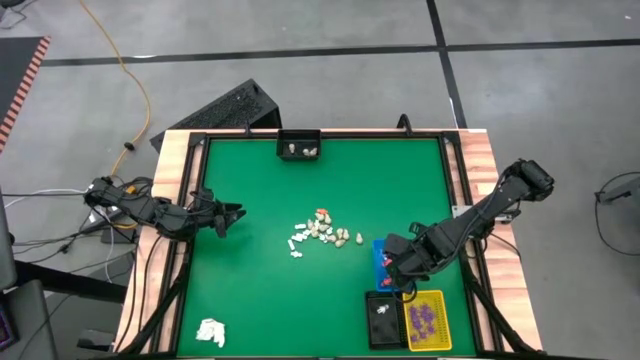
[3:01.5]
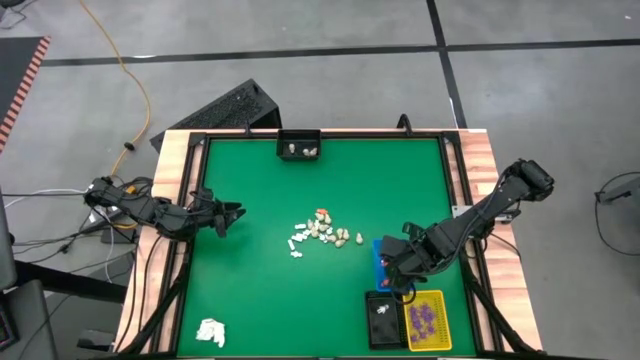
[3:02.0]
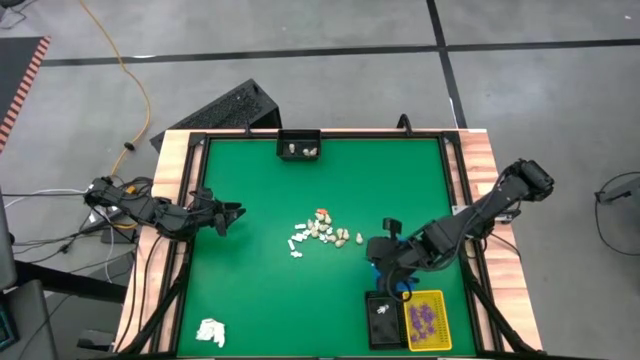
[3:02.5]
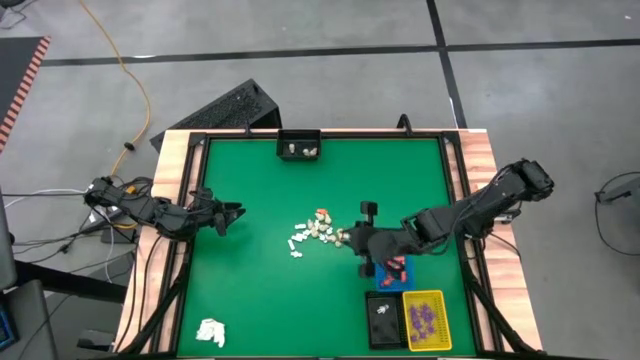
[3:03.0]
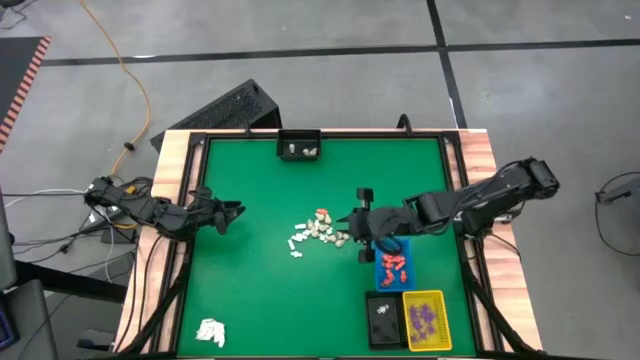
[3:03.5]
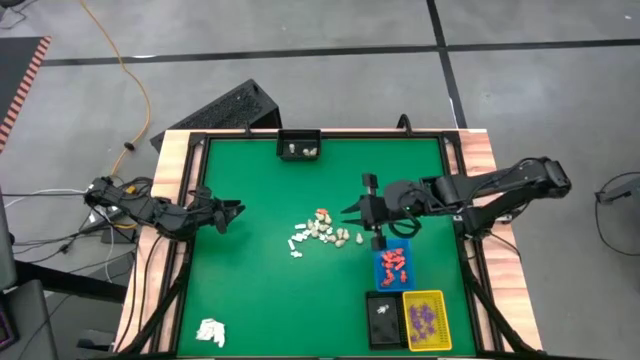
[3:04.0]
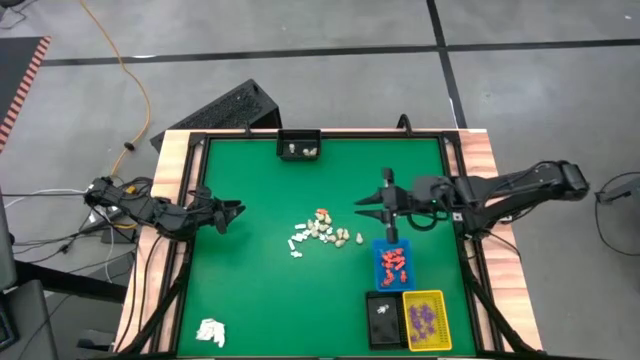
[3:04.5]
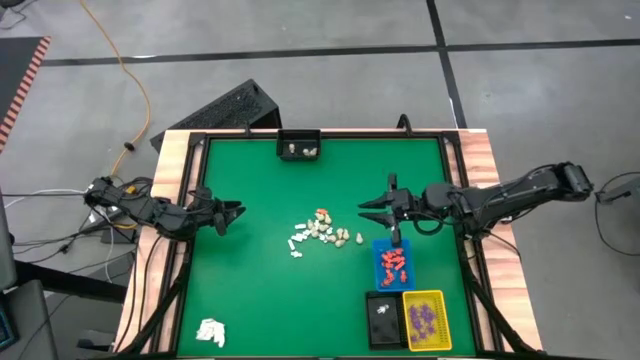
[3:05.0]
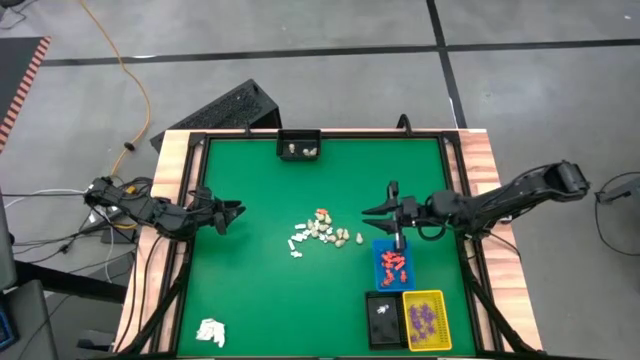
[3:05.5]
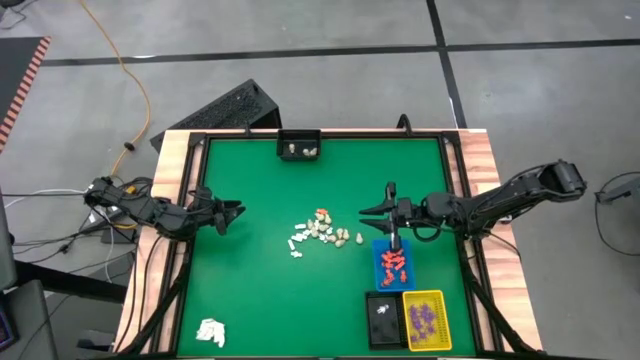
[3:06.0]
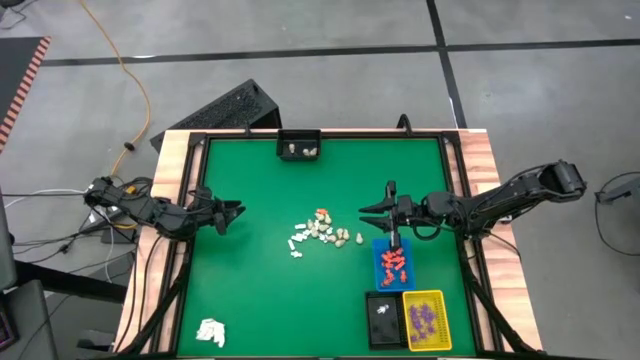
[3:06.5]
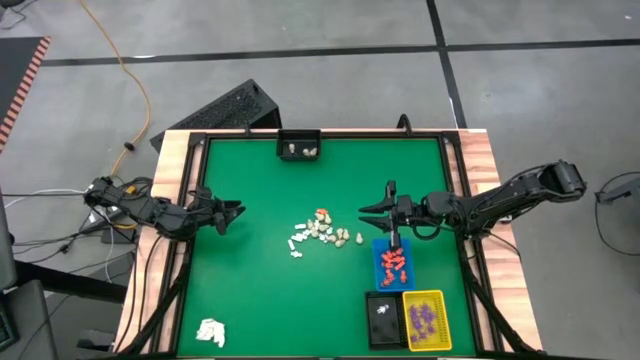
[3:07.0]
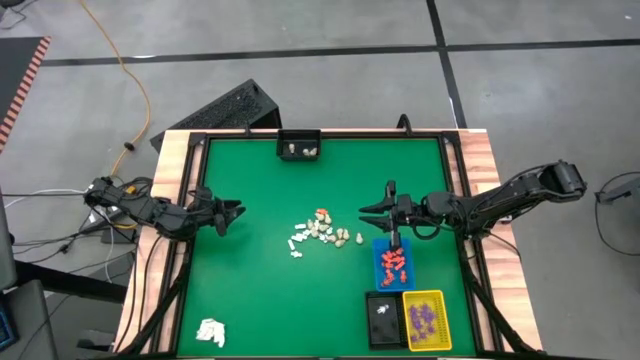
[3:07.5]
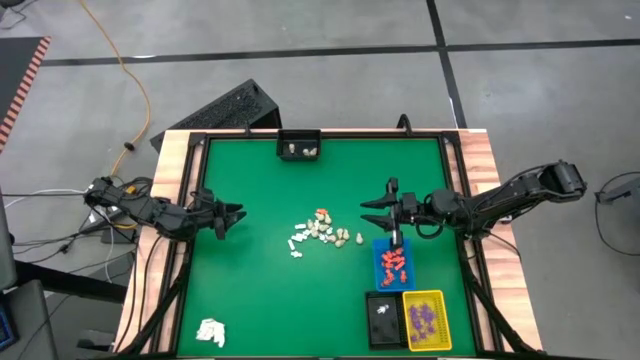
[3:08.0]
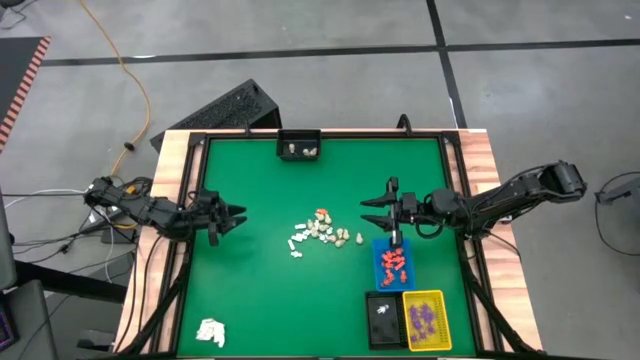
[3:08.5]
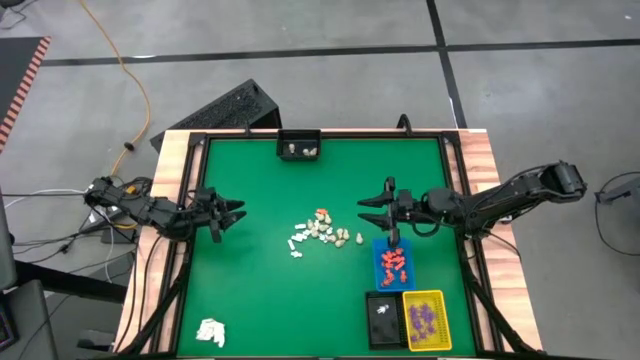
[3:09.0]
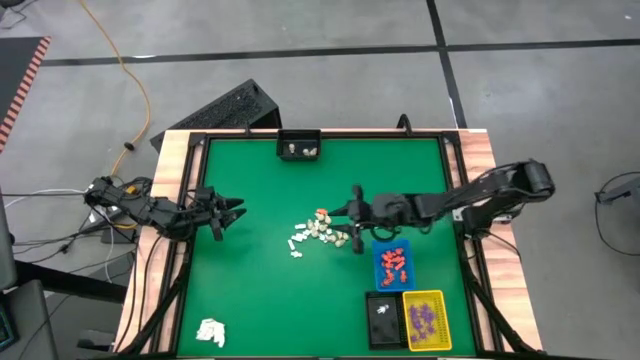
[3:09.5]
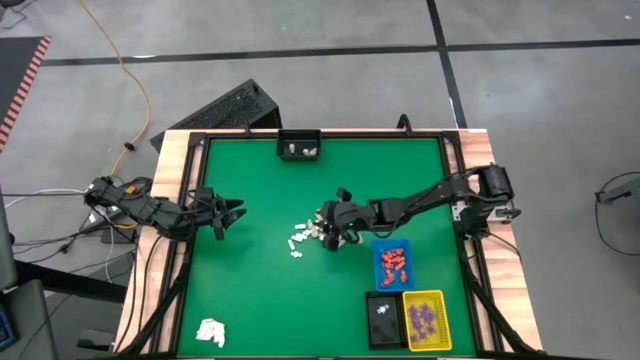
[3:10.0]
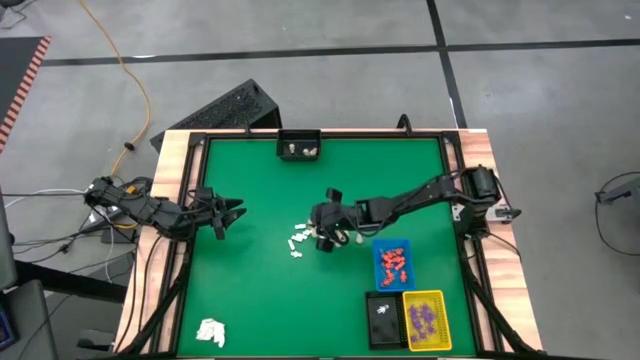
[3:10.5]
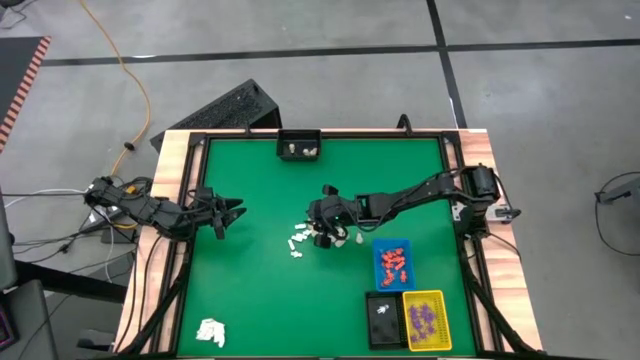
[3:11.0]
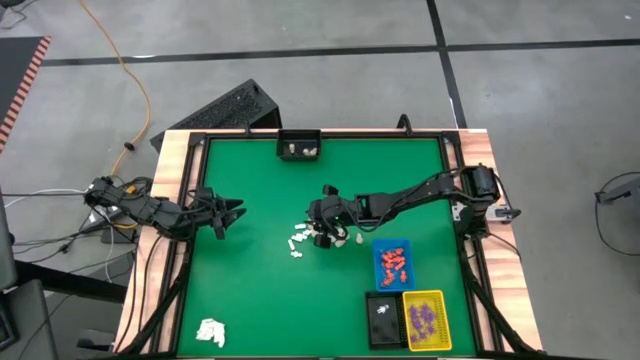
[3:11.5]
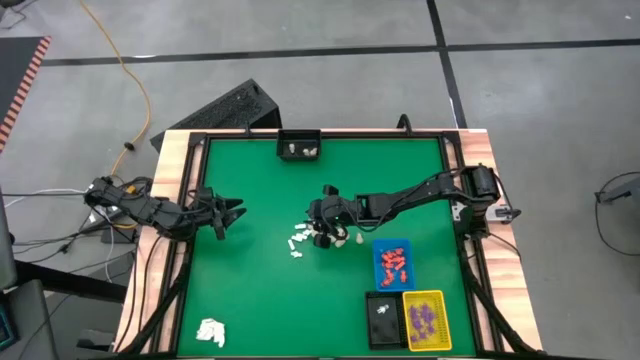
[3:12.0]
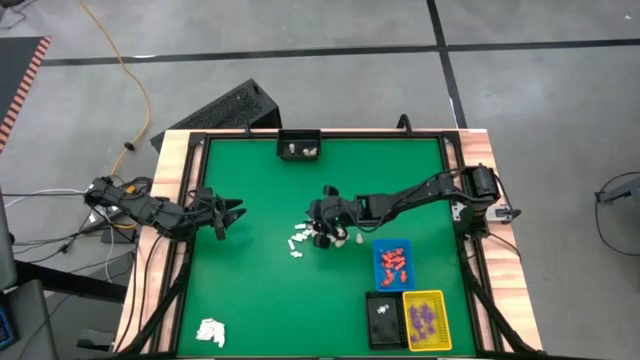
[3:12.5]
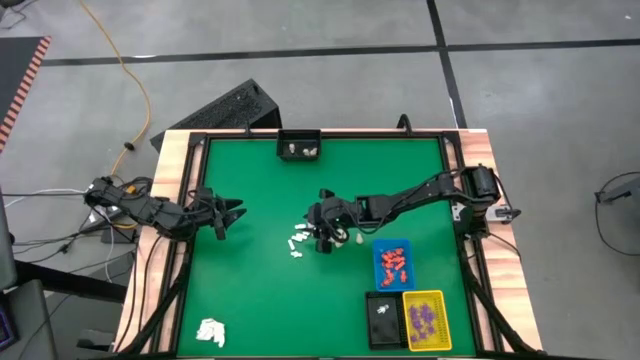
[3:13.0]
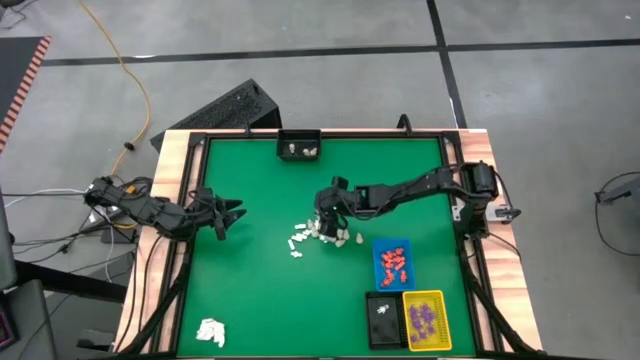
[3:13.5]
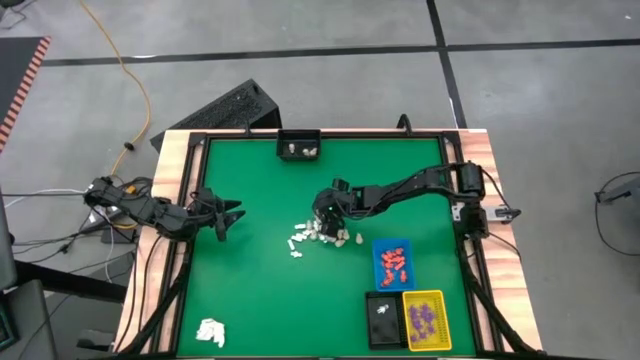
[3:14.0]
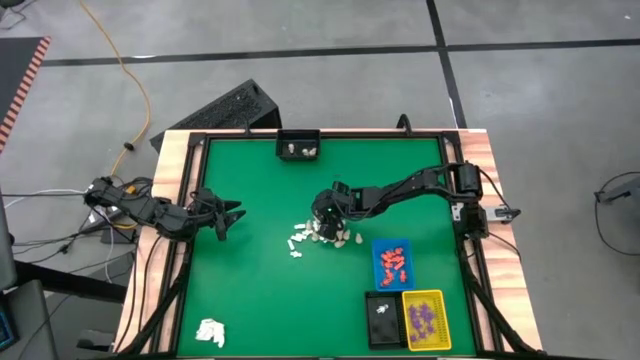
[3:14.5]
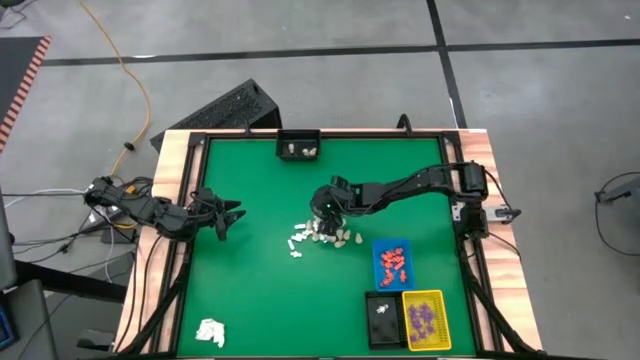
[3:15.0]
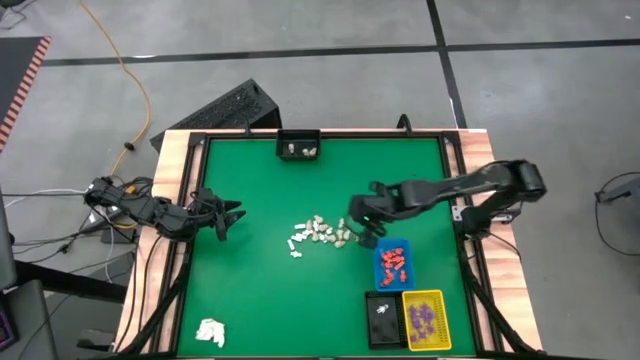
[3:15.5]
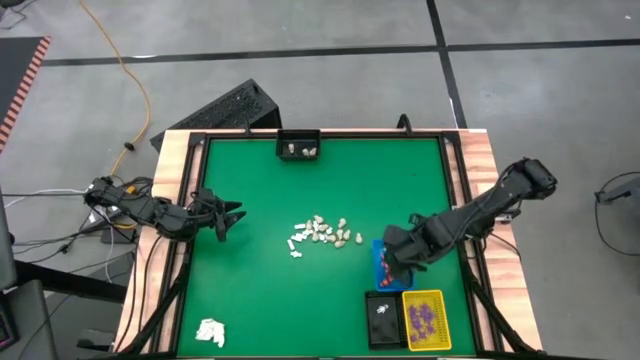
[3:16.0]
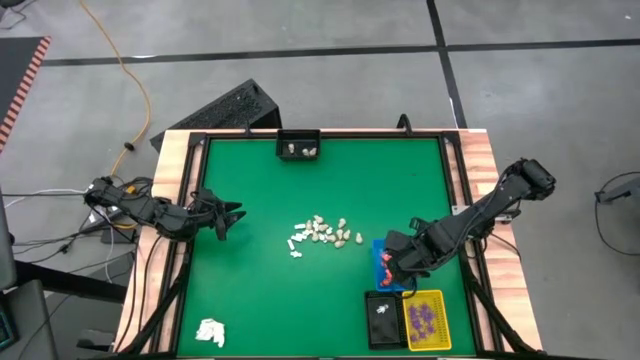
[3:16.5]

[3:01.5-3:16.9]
Task: Sort Halloween decoration
Put the orange skeleton toy into the blue bin

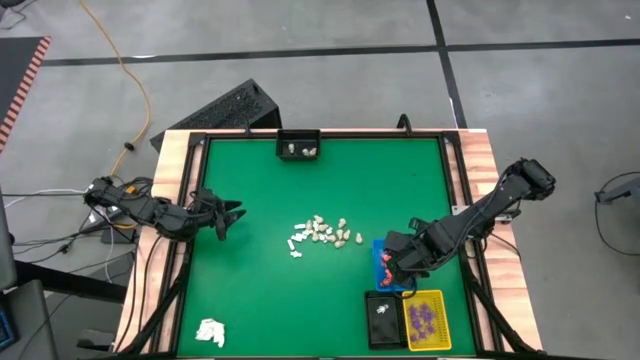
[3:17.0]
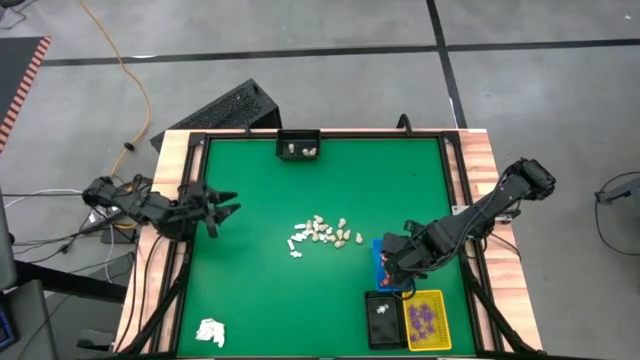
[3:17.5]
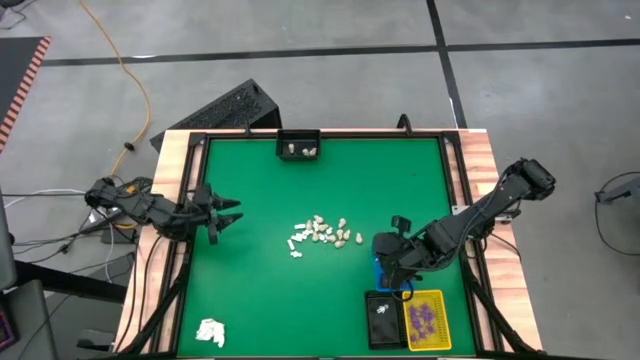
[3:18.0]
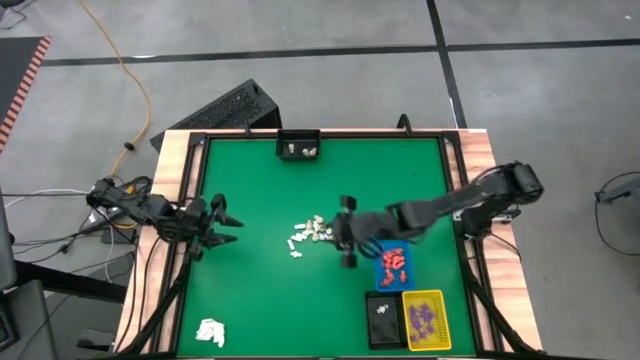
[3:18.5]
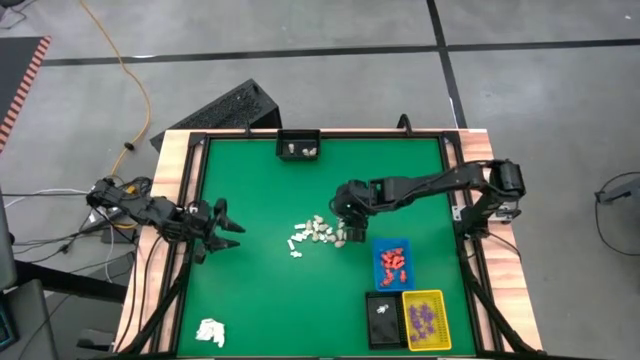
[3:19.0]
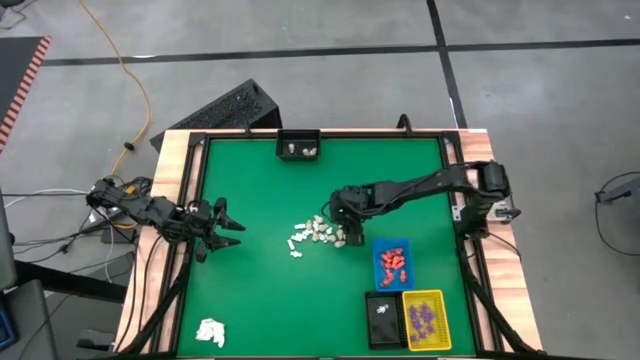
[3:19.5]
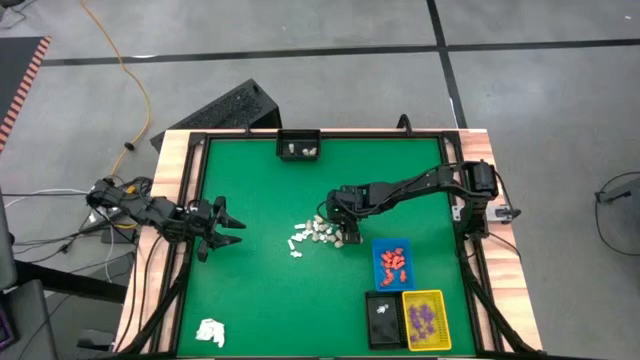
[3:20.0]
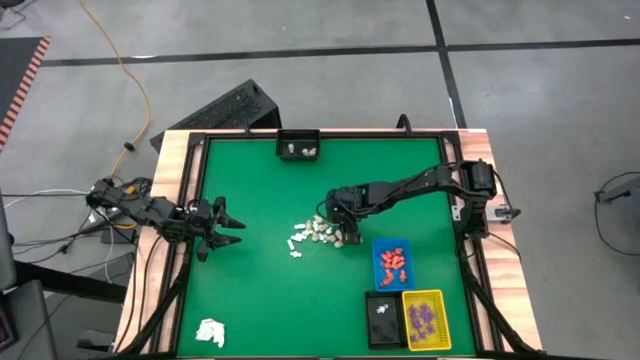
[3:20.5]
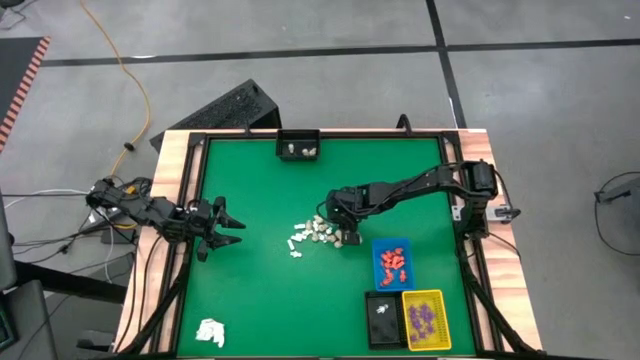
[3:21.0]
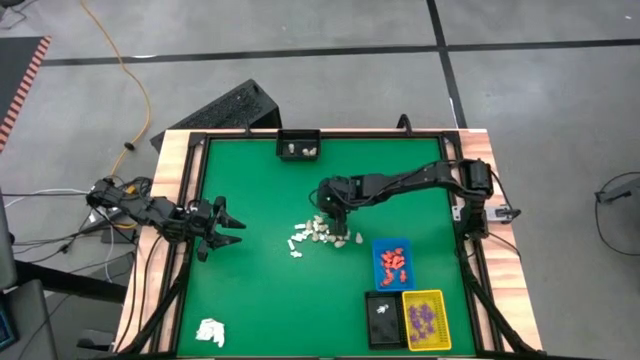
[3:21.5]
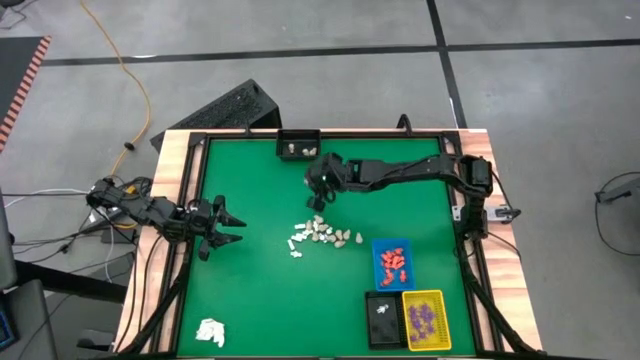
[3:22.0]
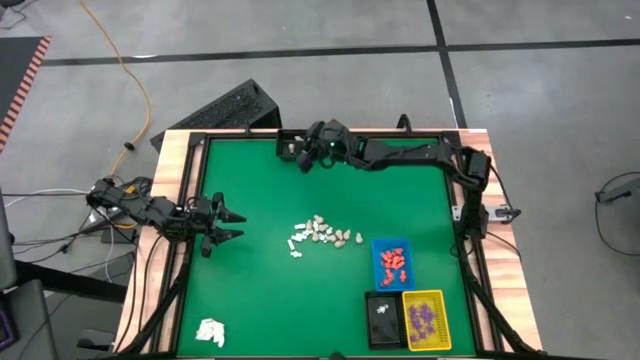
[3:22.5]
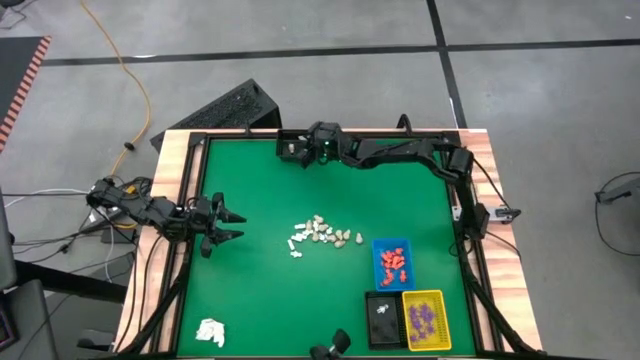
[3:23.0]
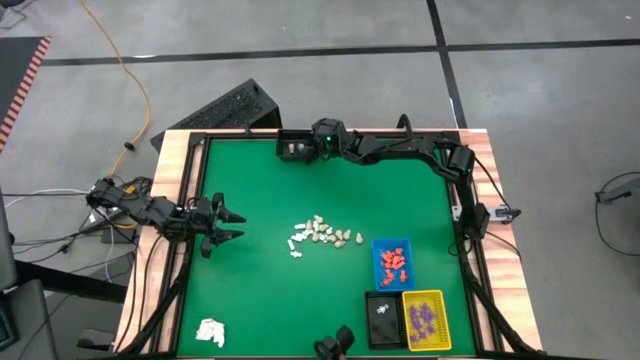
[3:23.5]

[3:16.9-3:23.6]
Put the gray skull toy into the top black bin
